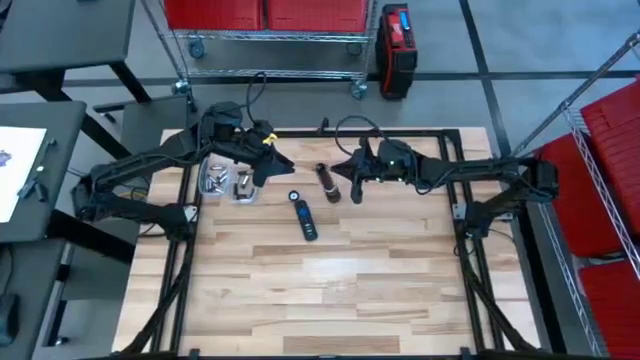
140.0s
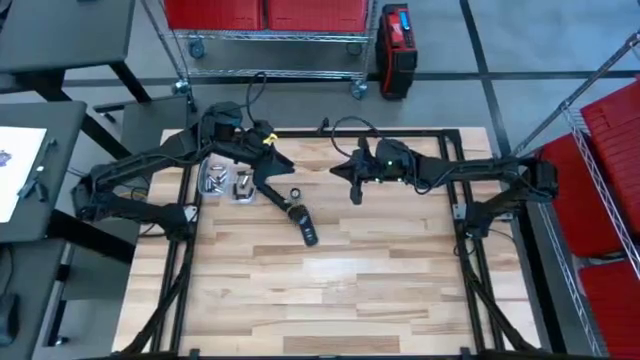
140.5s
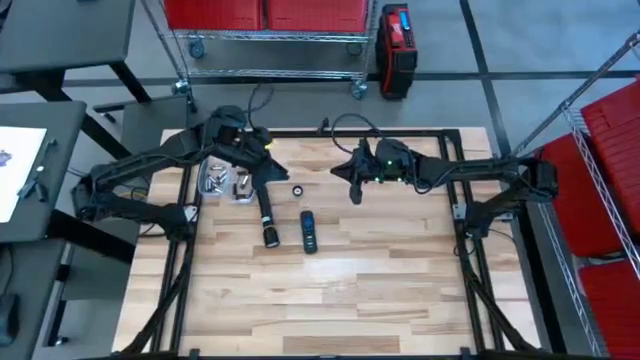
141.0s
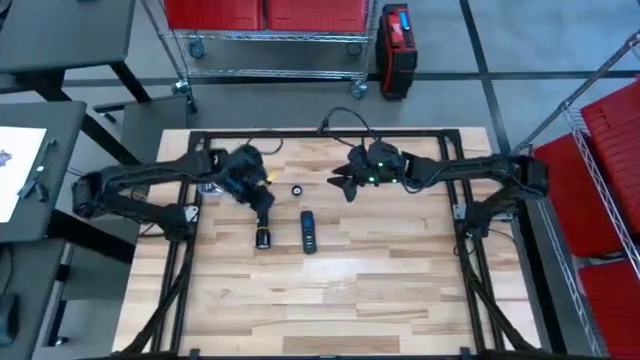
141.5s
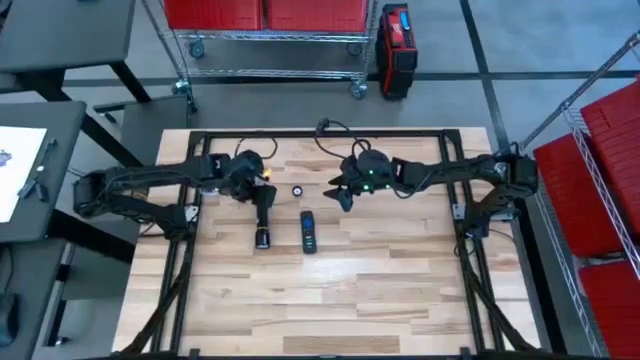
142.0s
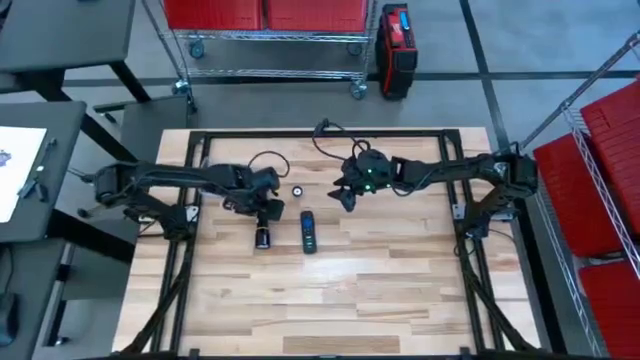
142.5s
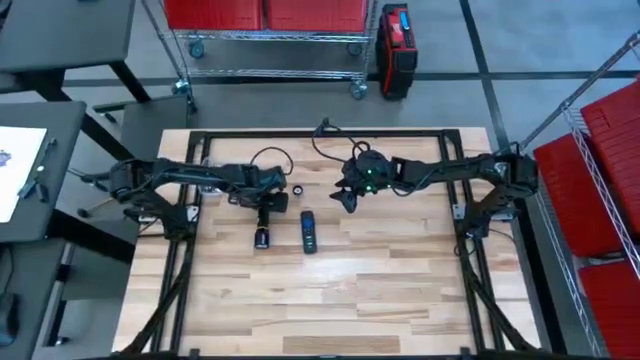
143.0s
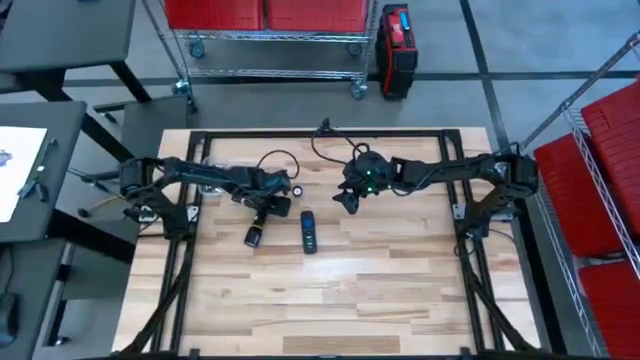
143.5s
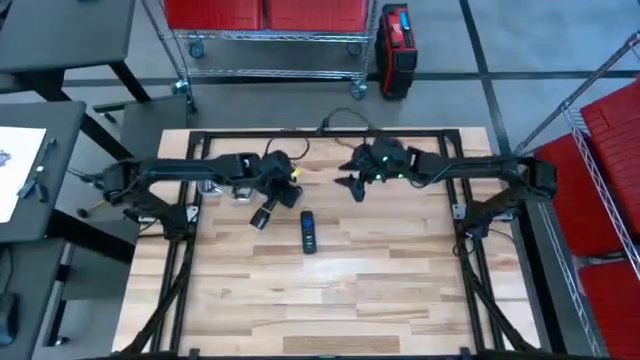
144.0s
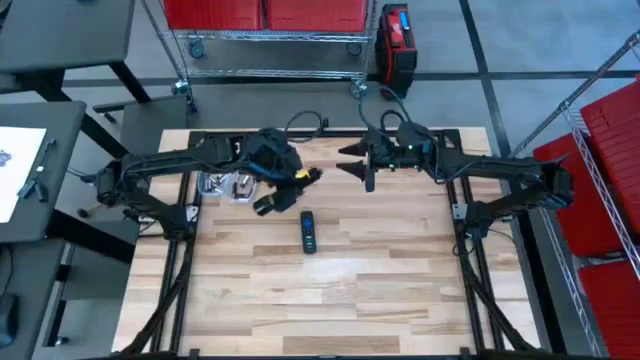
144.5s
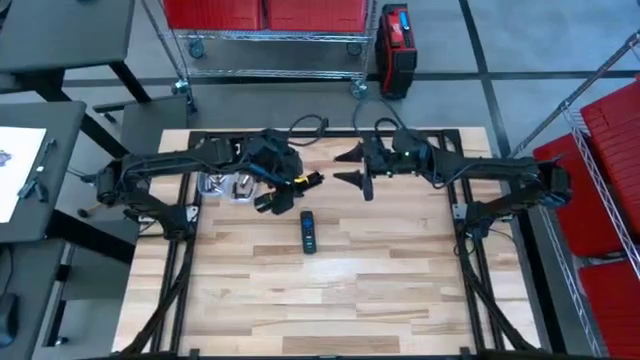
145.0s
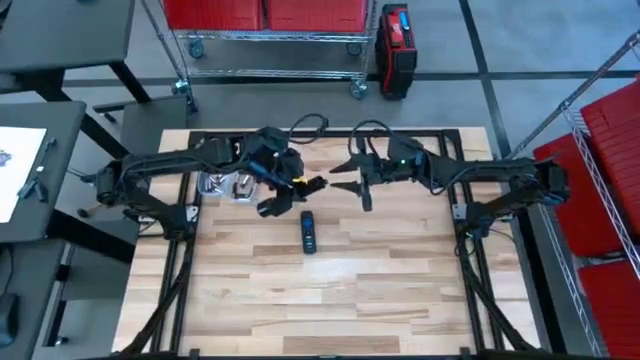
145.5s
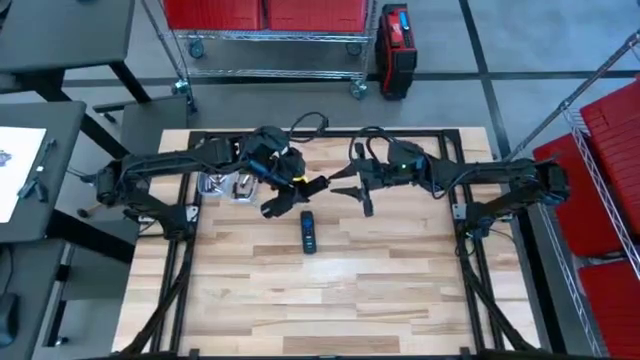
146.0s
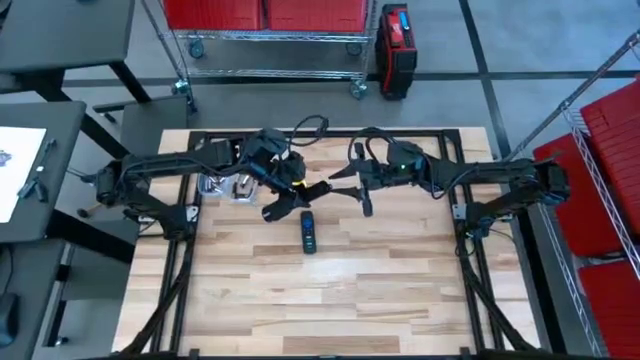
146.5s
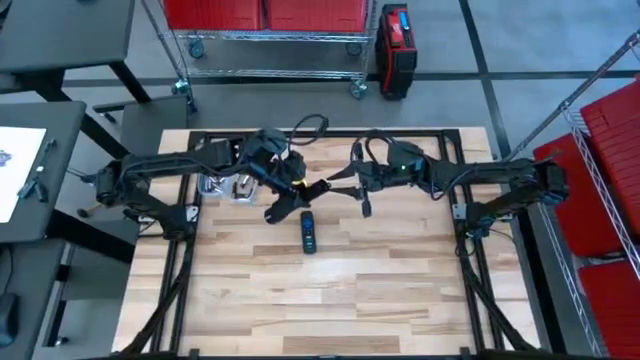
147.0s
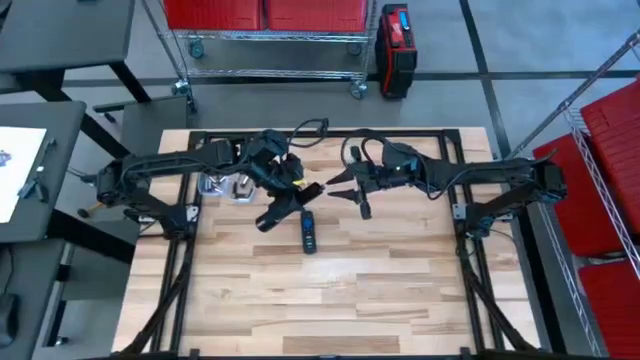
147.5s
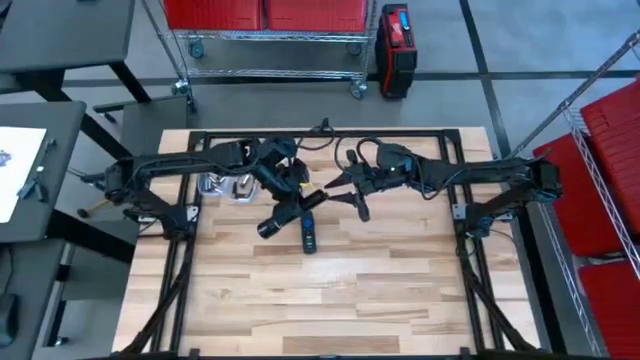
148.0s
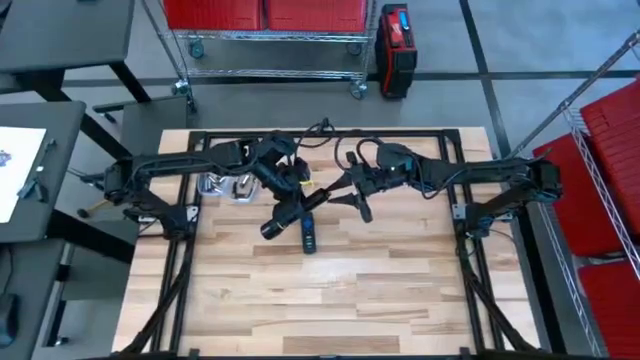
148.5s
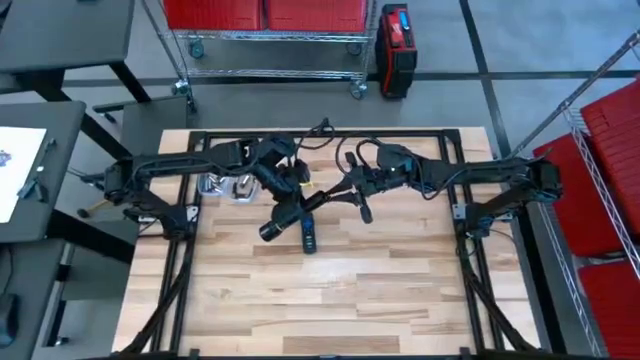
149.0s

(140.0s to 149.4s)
Task: Insert battery
Insert the brown battery into the flashlight's battery compartment

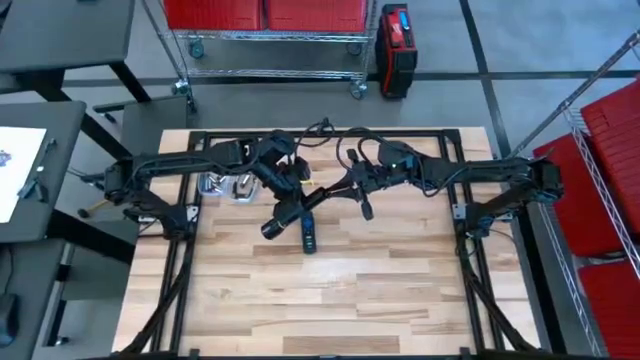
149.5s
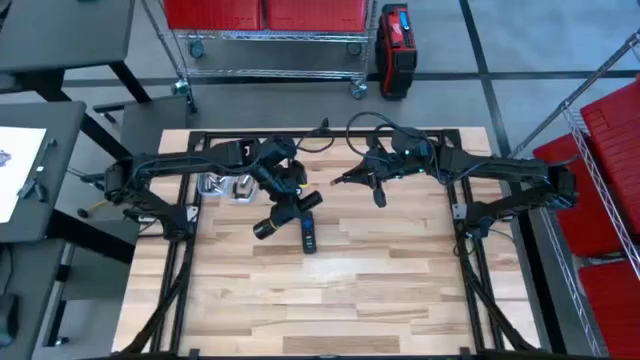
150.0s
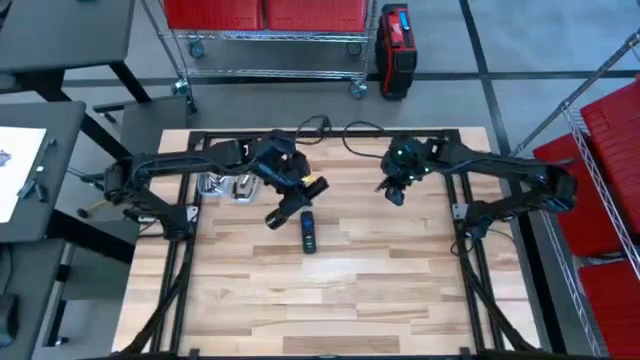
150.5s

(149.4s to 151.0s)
Remove the brown battery from the flashlight's battery compartment onto the table

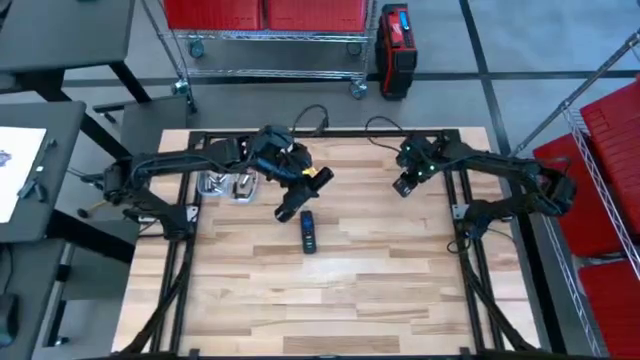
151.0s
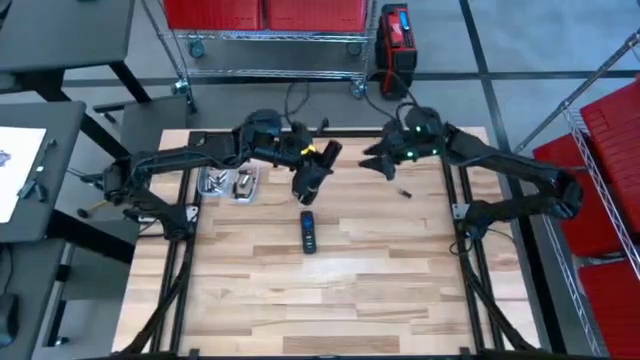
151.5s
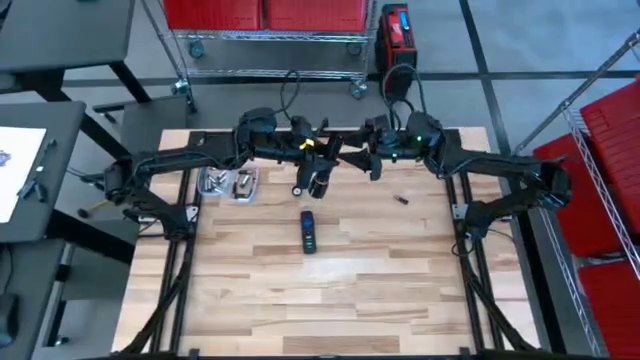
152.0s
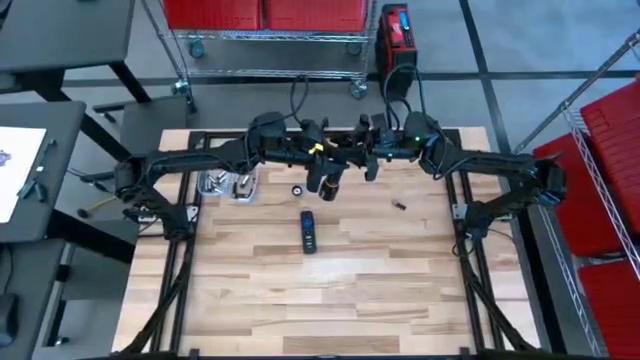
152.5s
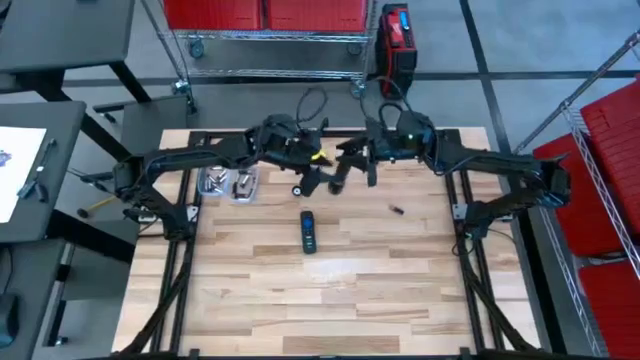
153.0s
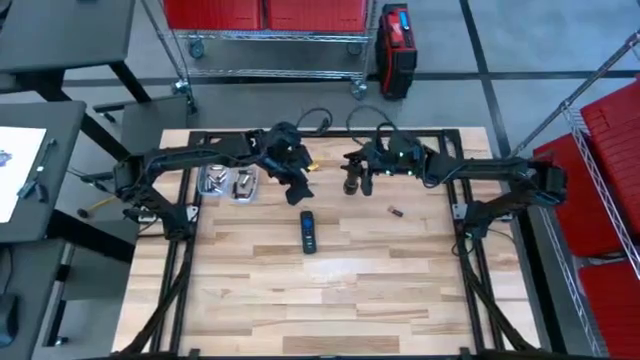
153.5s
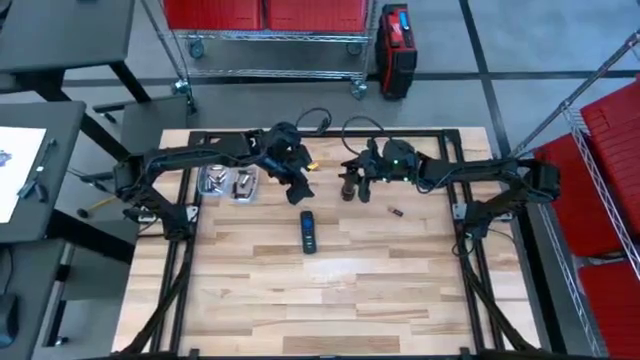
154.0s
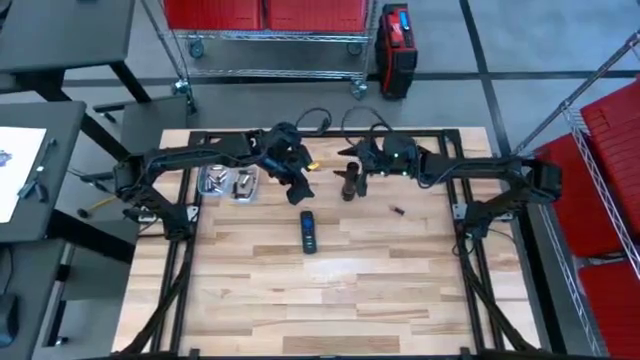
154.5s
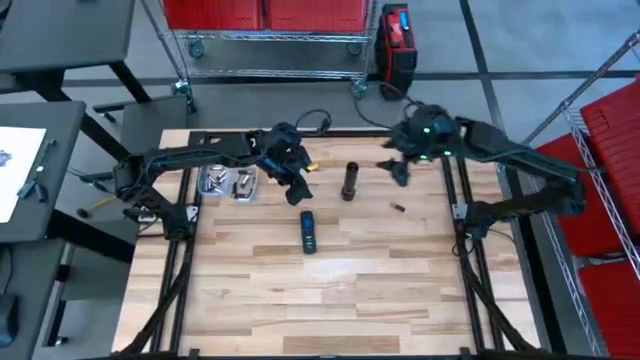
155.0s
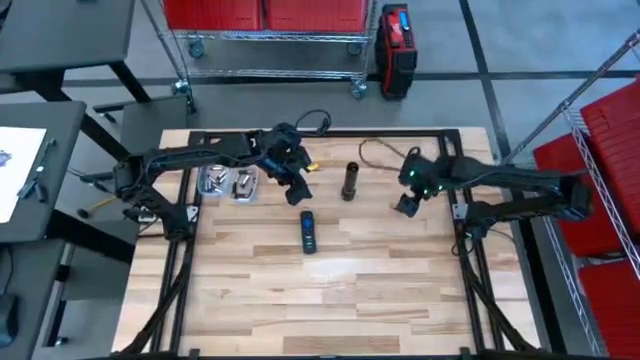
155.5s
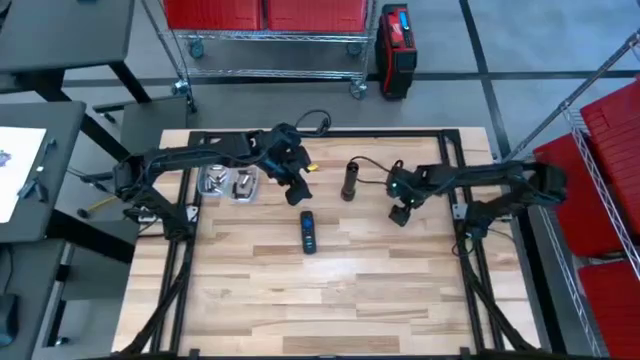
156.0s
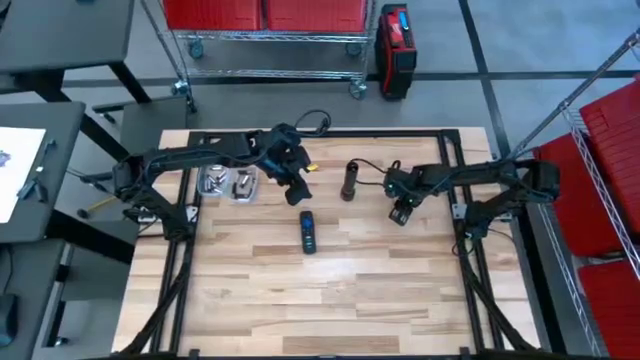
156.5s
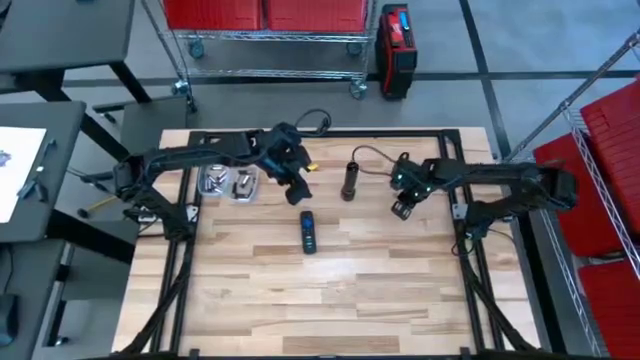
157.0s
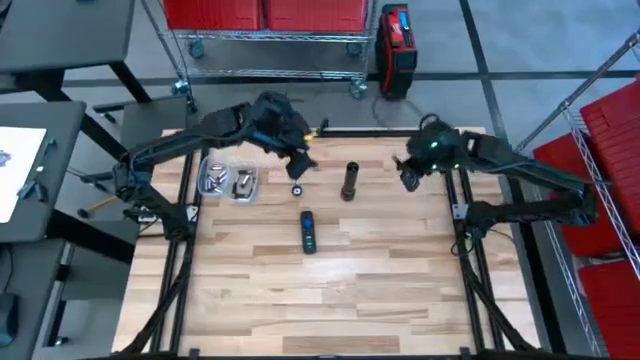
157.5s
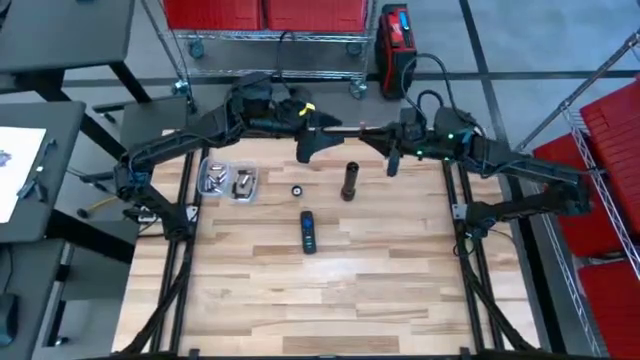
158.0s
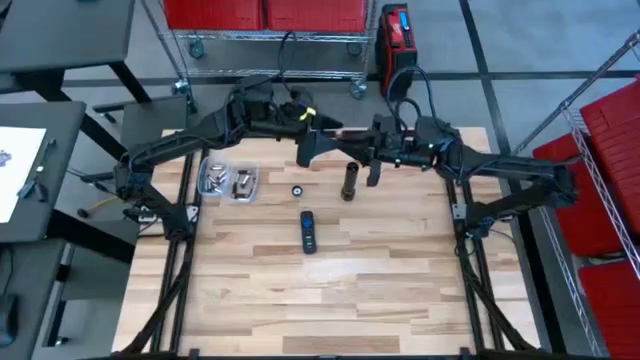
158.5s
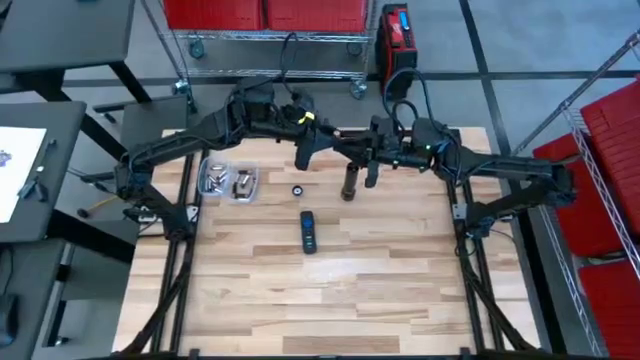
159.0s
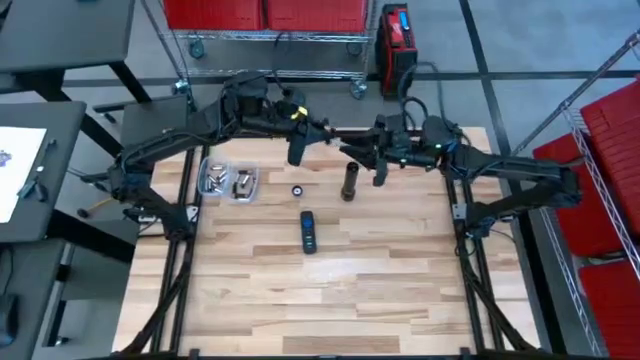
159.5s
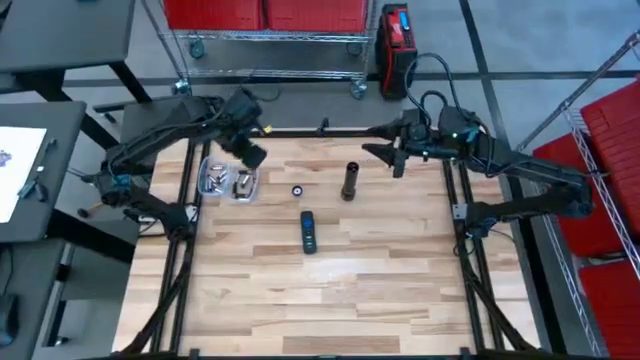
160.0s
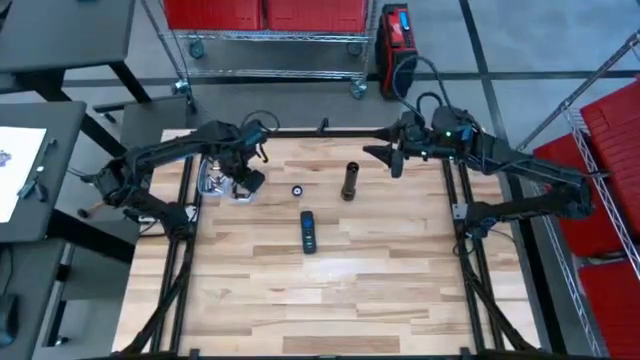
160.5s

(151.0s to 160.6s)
Put the brown battery into the right transparent bin

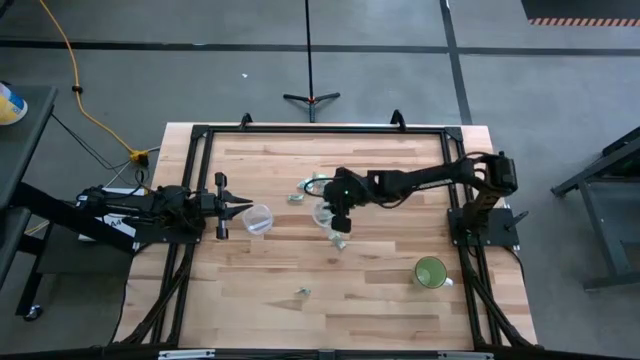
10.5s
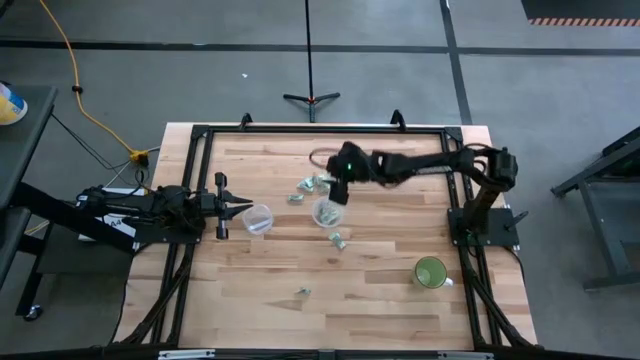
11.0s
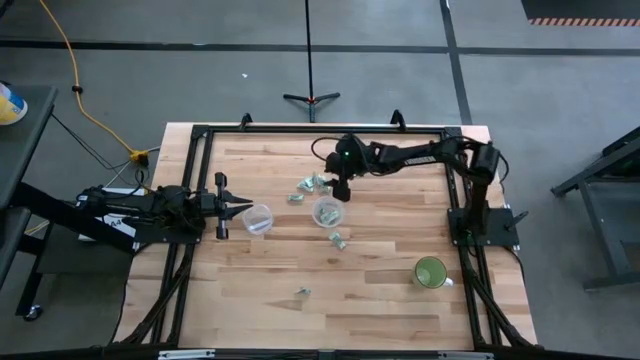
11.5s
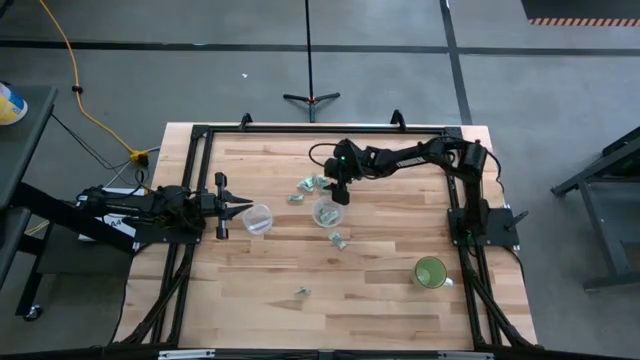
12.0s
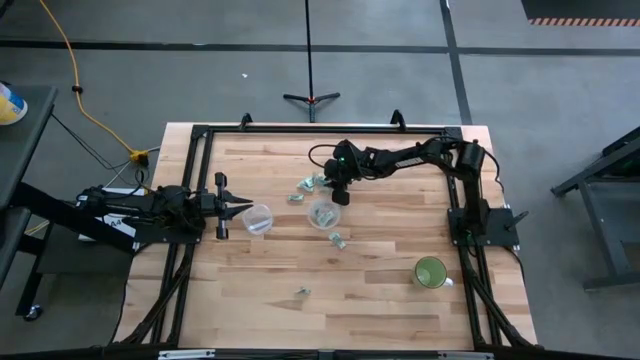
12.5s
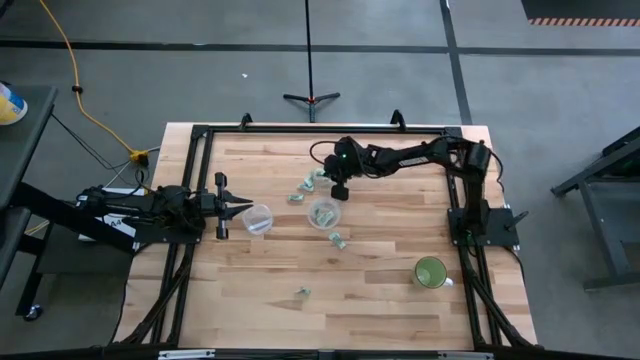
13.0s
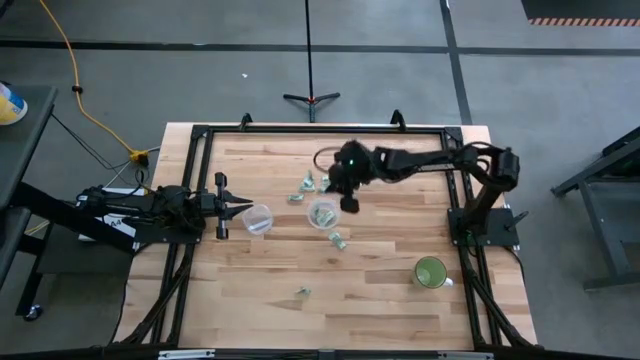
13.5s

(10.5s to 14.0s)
Task: Pick and place Stevia / Truvia into bins
Put the white stevia packet into the right transparent container
